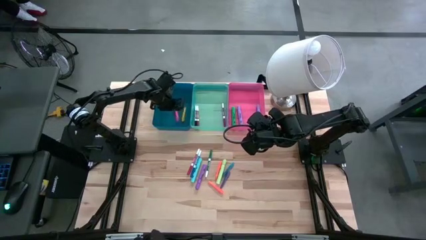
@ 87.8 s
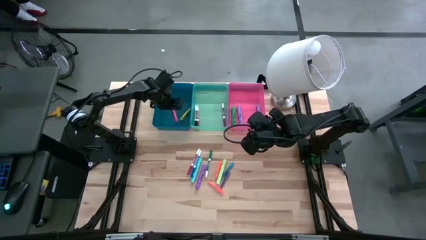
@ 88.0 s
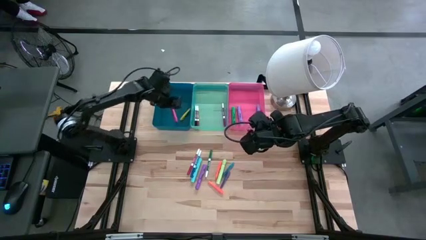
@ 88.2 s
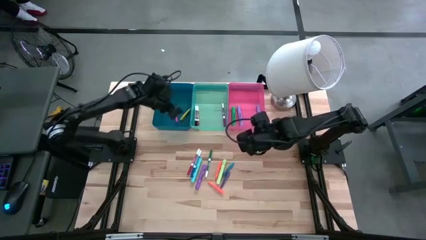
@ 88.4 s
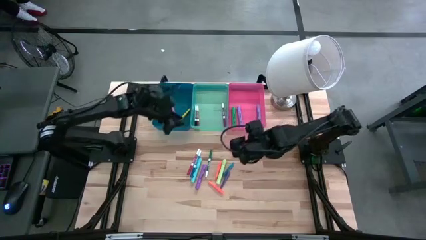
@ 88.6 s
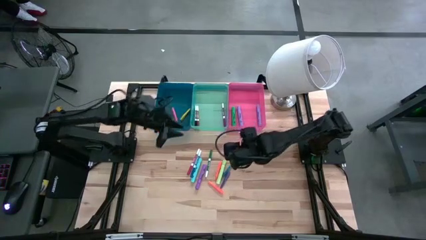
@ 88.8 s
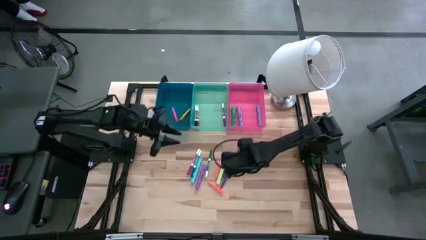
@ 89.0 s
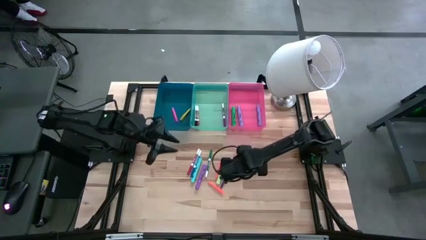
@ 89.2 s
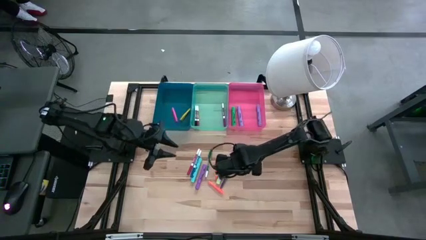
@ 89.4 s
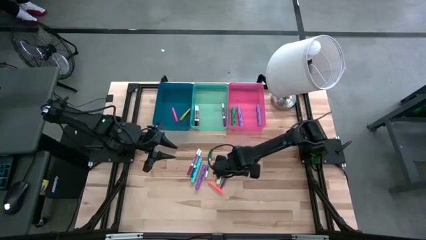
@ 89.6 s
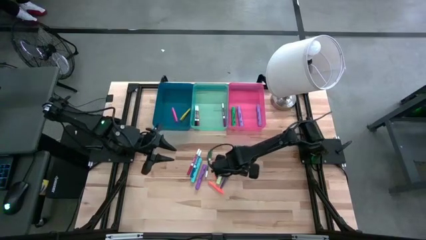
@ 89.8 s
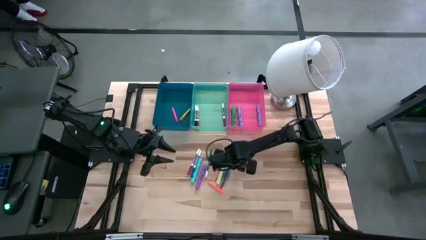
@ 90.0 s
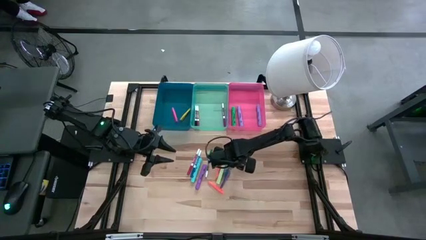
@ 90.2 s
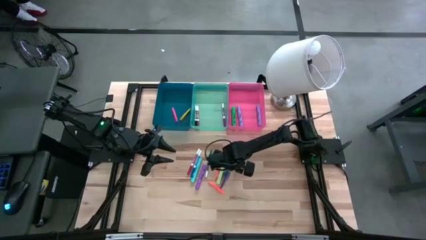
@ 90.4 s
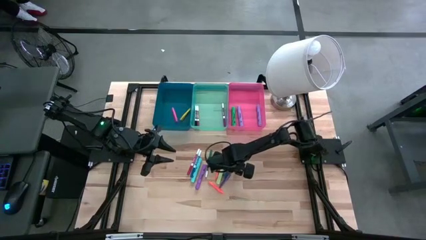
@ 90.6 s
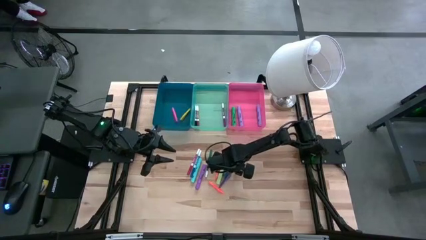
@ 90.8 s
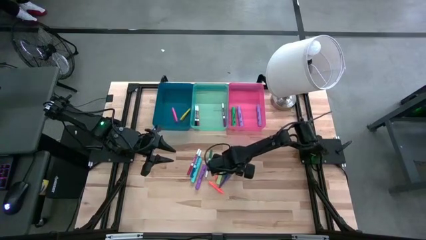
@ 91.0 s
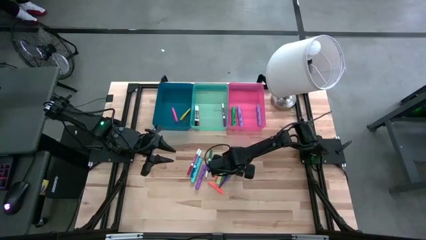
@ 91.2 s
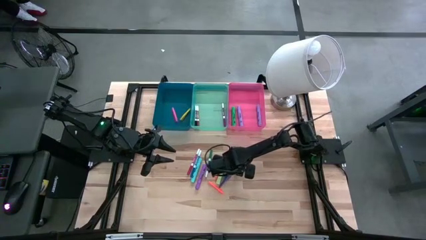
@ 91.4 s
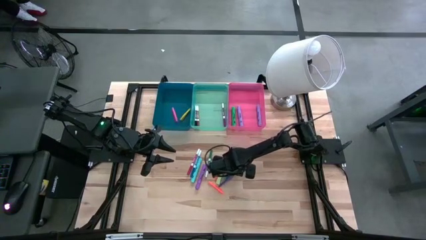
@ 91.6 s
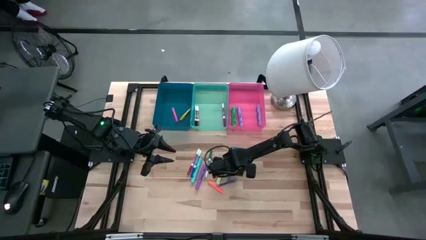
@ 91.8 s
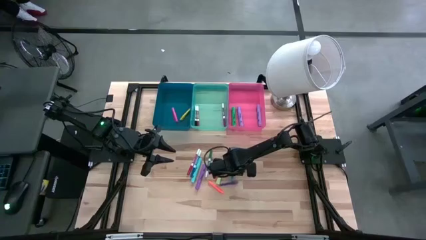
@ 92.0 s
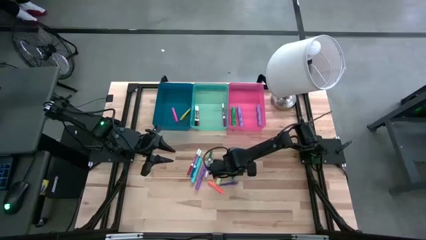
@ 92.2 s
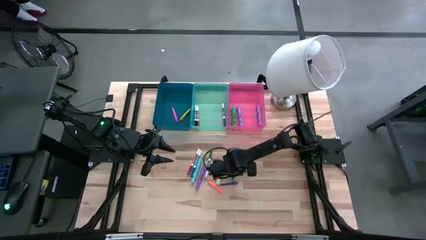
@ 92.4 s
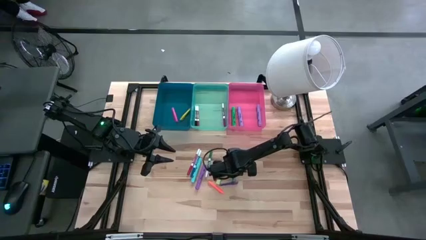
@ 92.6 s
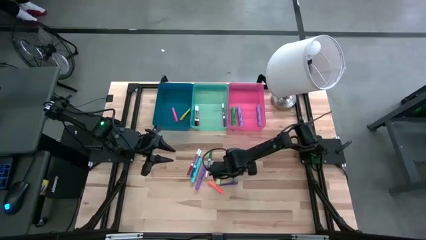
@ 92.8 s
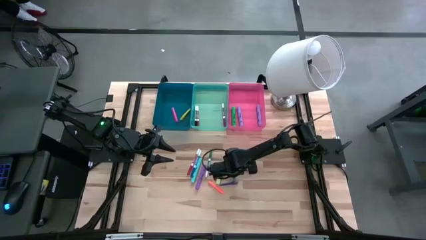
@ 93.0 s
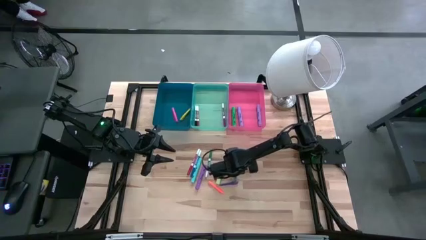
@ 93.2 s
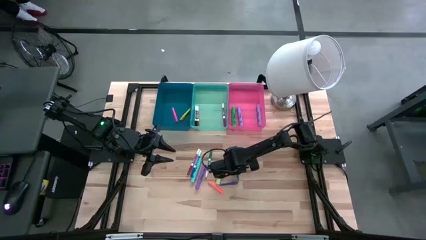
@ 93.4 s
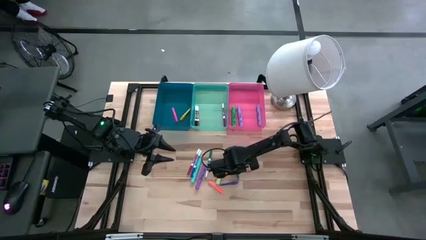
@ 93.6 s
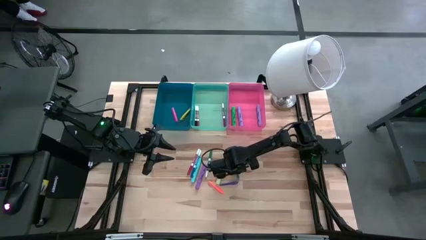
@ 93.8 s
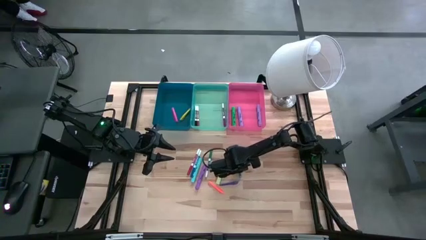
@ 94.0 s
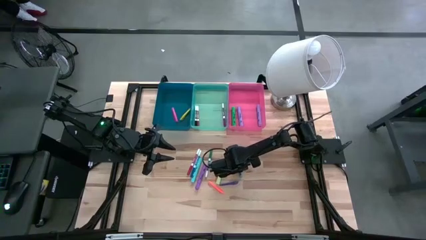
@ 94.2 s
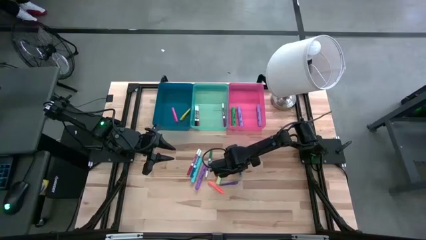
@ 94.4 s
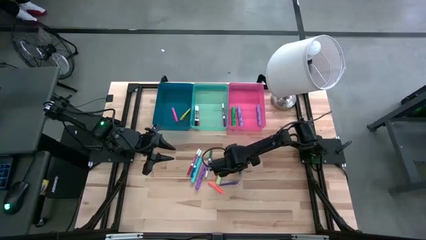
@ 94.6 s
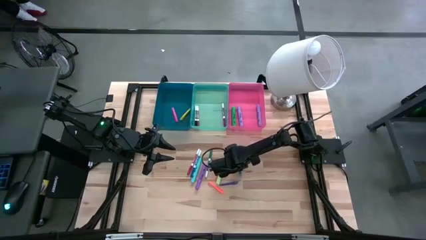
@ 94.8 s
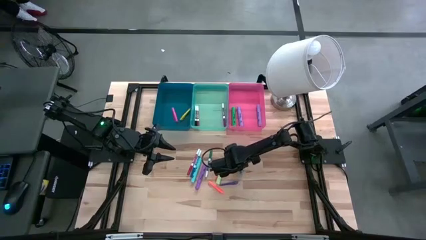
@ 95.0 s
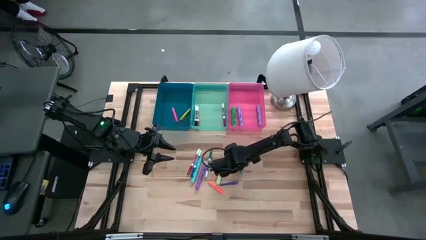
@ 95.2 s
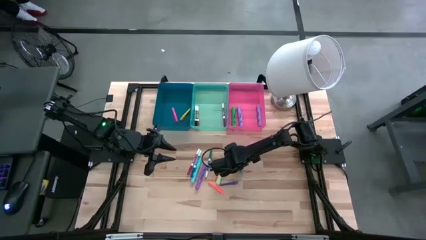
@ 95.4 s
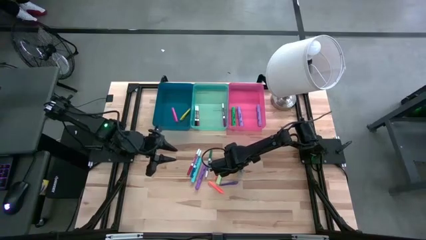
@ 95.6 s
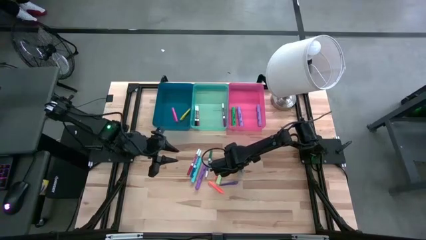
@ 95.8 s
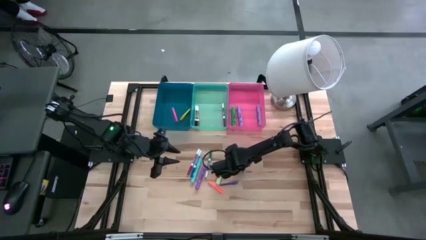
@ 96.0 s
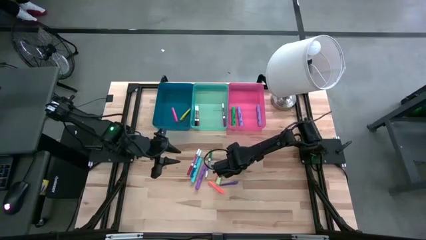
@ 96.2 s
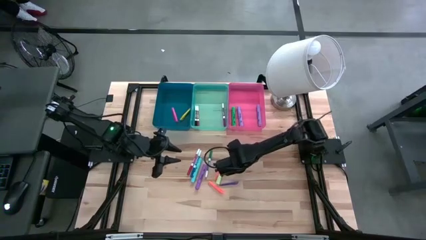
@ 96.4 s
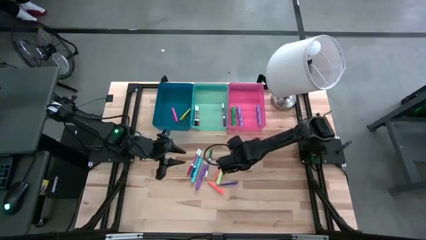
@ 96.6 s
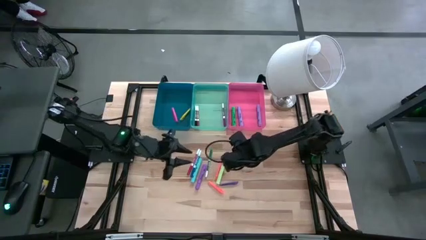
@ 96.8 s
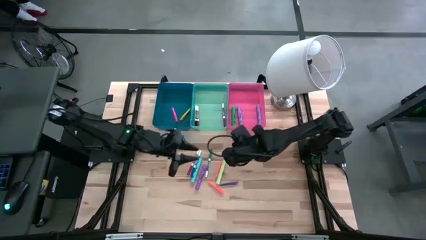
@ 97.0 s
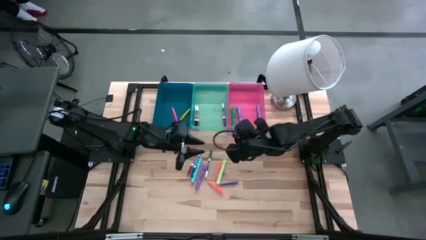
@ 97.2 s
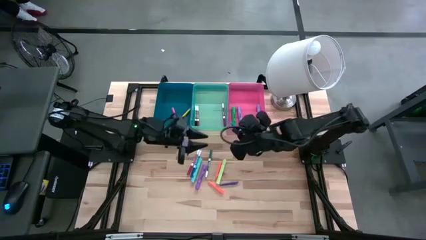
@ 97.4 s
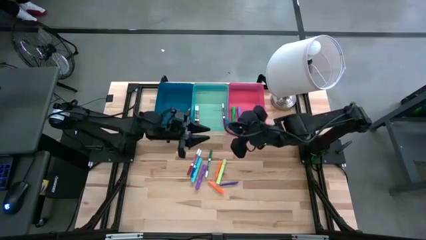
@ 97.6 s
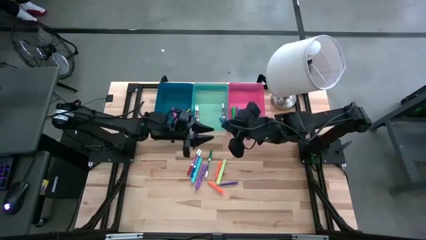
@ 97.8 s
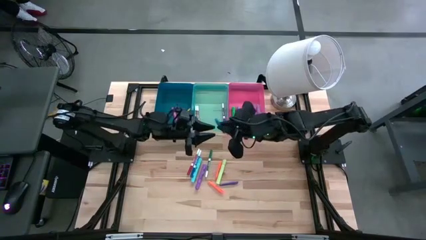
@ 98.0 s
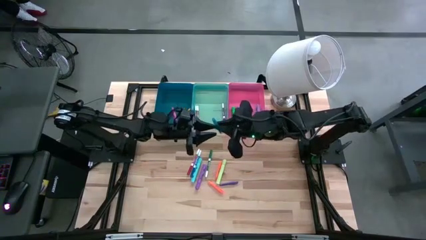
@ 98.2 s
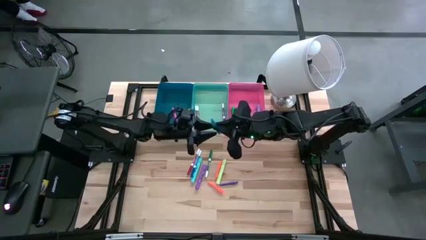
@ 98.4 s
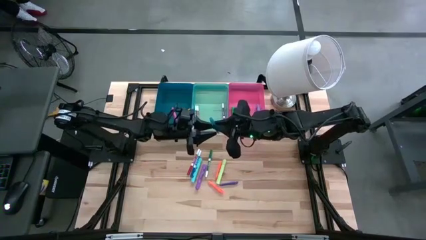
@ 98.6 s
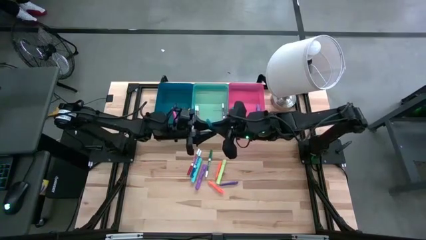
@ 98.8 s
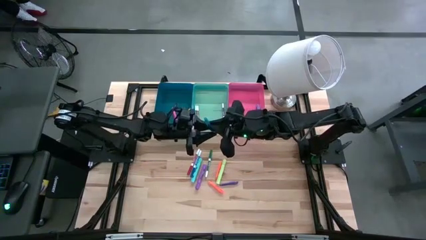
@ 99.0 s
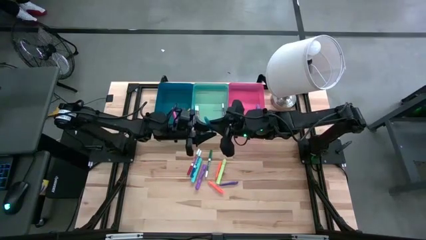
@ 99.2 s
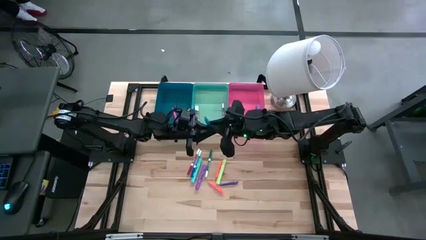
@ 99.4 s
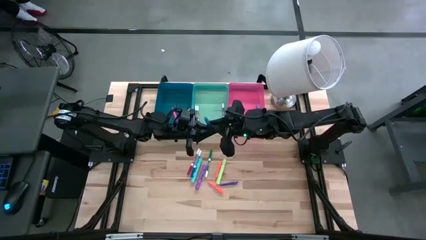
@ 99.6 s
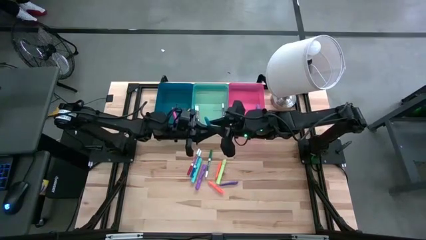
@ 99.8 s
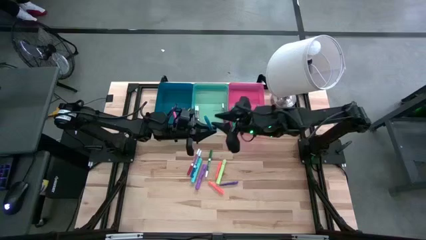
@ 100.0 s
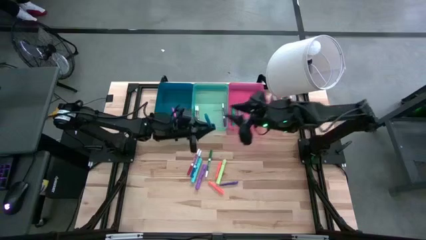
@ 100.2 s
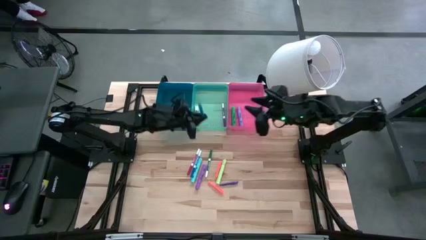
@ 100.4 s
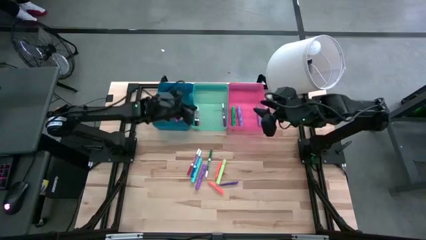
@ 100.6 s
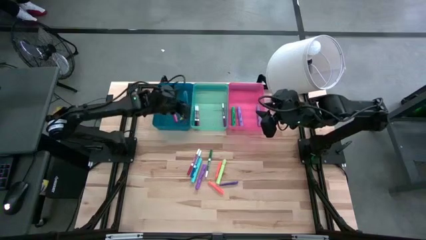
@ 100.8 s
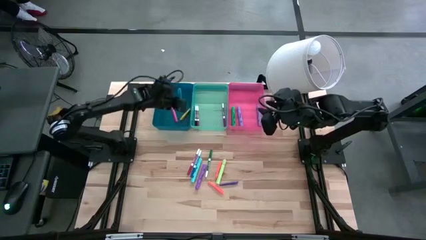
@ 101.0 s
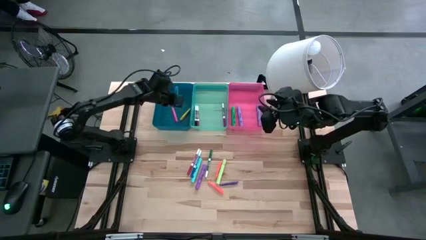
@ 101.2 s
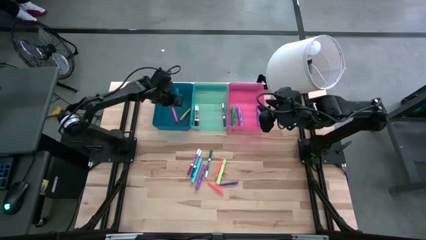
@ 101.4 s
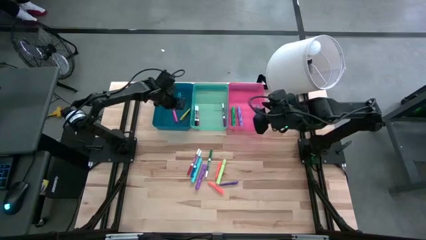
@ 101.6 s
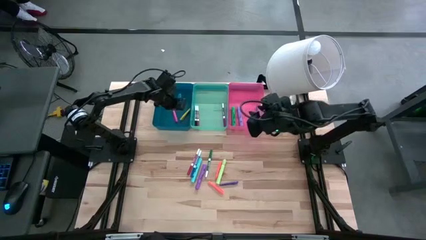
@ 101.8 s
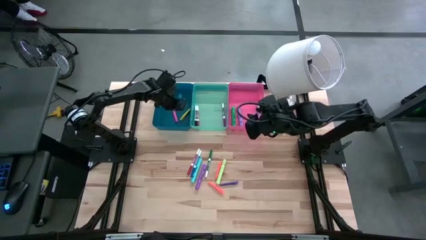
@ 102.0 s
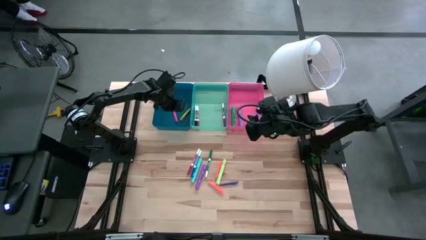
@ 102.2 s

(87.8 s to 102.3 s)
Task: Pick & Place Markers
Put the blue pen into the blue bin

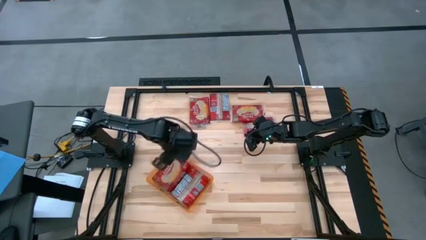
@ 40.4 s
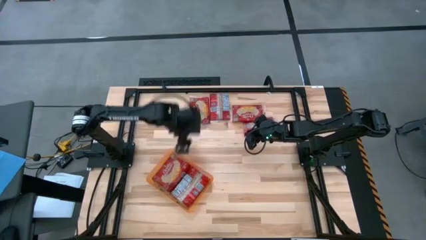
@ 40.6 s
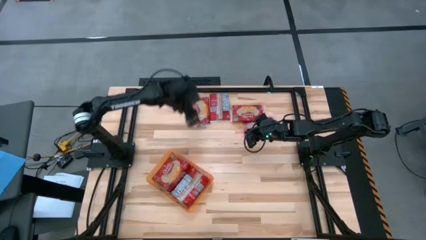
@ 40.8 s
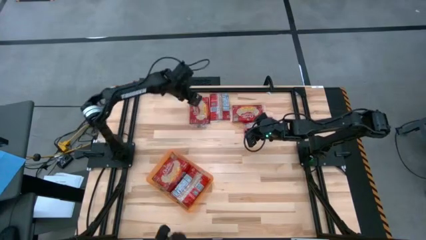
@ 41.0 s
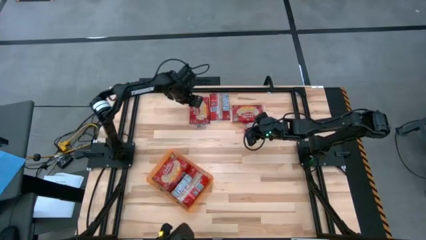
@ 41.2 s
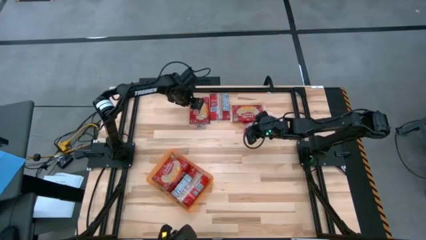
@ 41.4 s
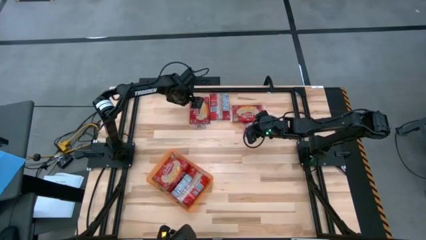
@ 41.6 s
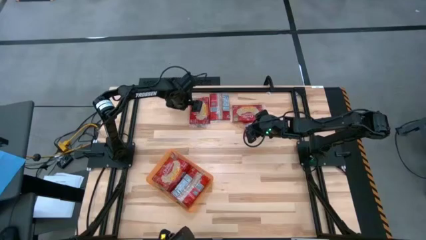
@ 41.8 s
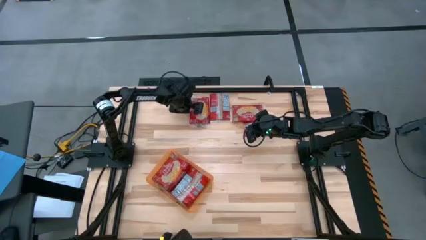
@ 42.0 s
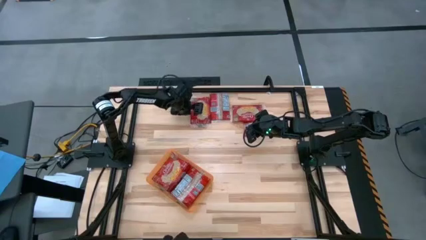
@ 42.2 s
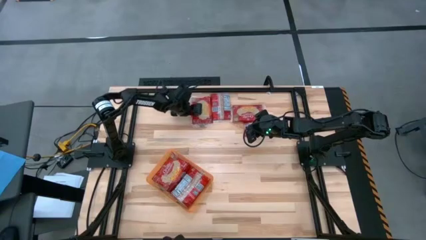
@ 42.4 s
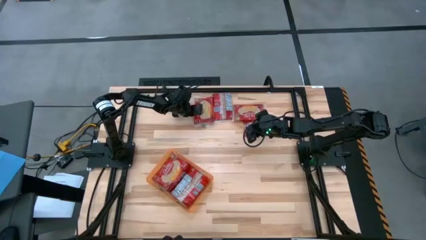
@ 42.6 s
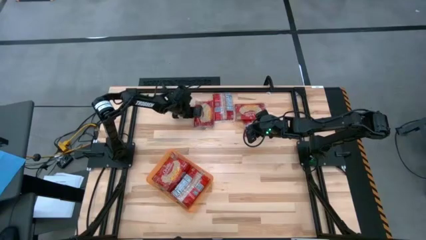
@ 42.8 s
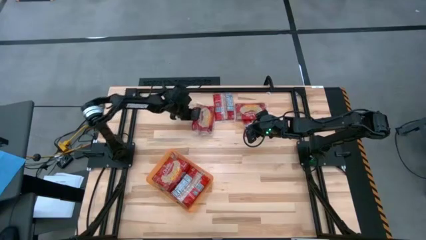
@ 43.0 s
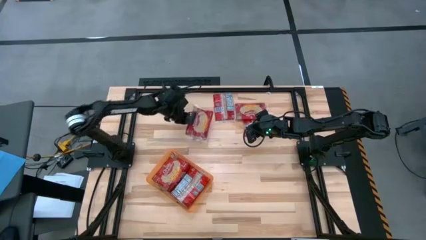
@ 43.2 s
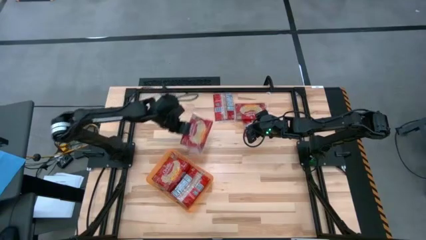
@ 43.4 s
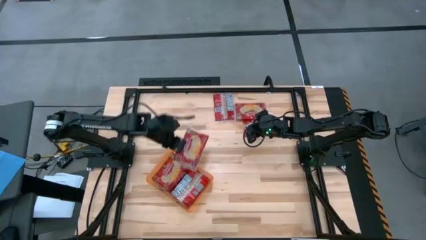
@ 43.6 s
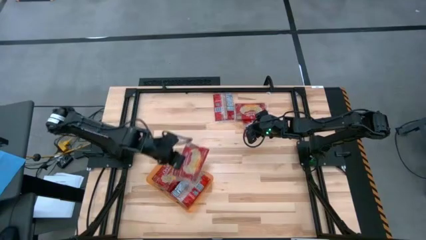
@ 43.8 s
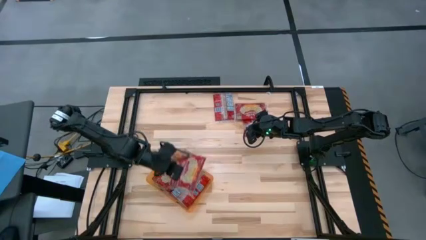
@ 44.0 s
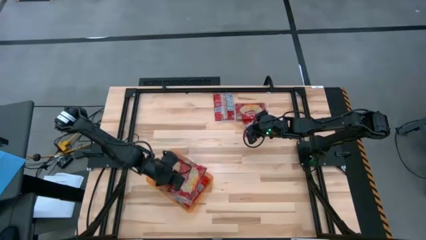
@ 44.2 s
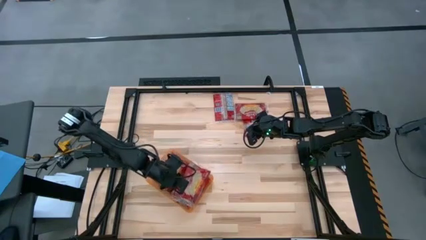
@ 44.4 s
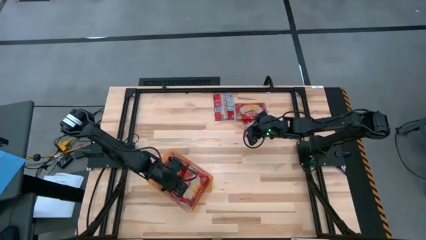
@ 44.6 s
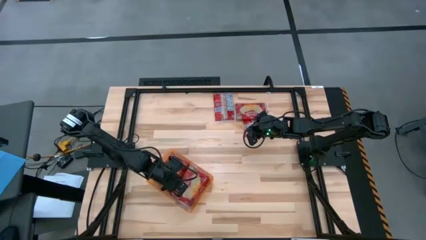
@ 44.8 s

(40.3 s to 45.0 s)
Task: Sort popcorn bags into baskets
Put the popcorn bag into the orange bin
